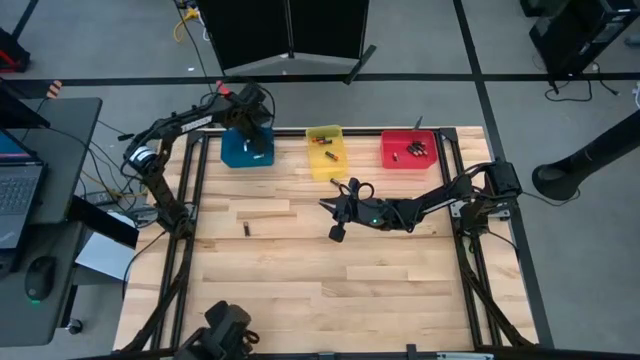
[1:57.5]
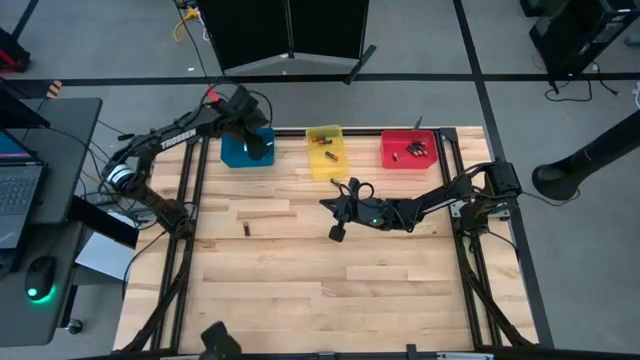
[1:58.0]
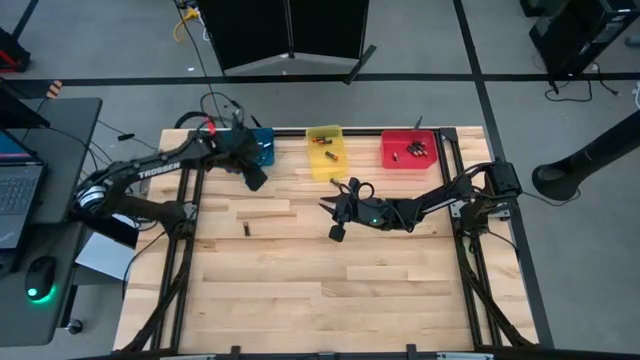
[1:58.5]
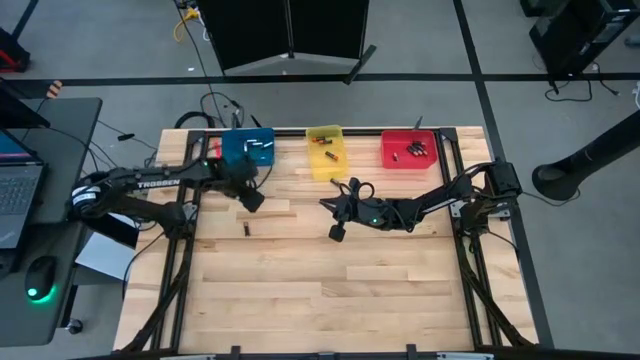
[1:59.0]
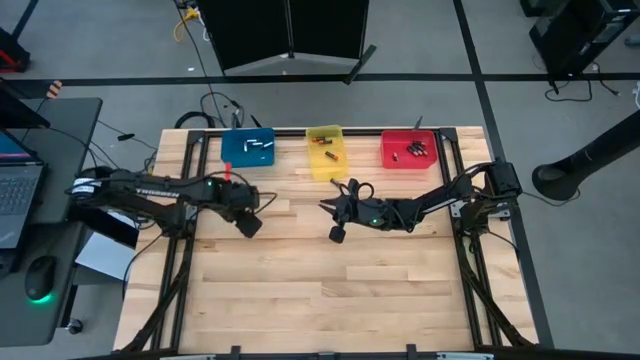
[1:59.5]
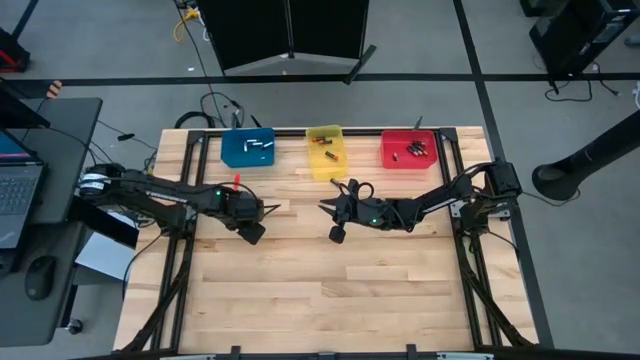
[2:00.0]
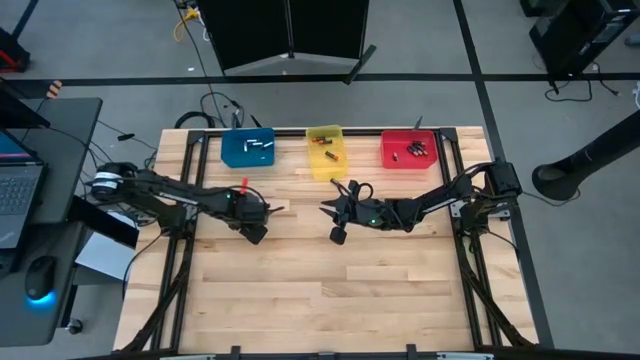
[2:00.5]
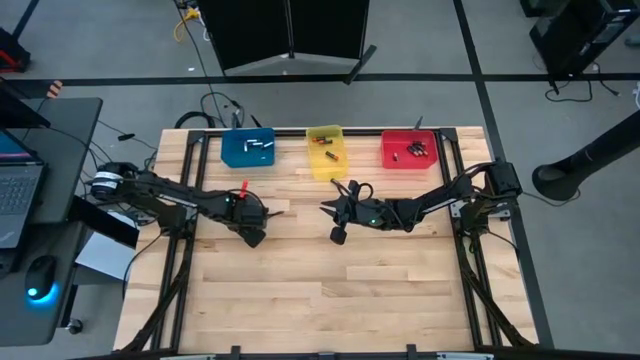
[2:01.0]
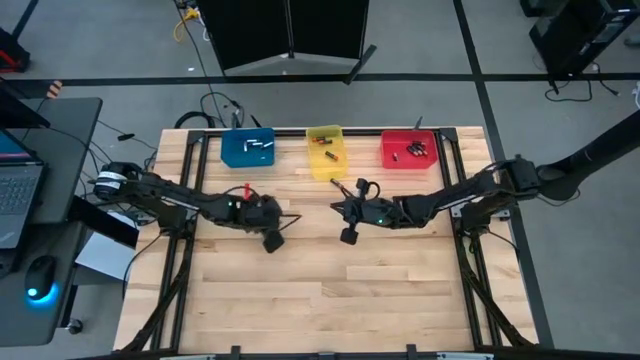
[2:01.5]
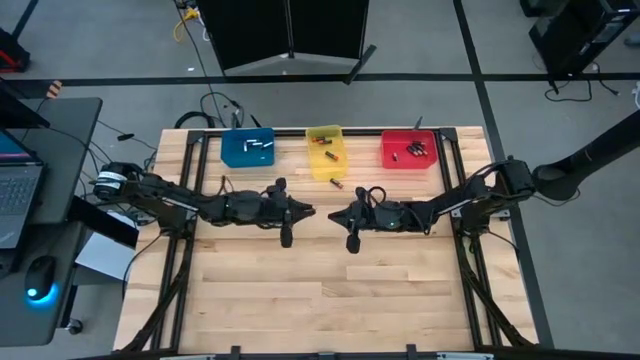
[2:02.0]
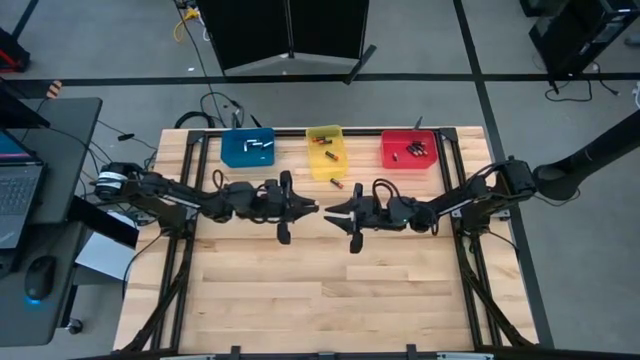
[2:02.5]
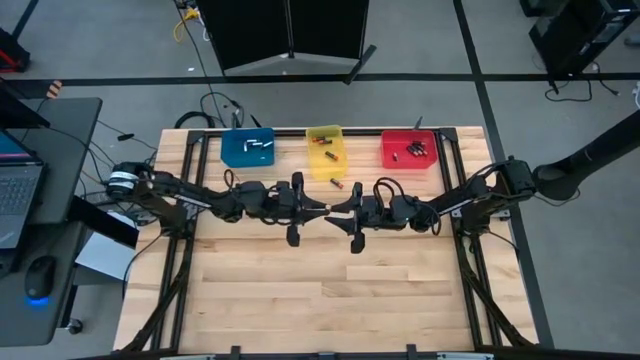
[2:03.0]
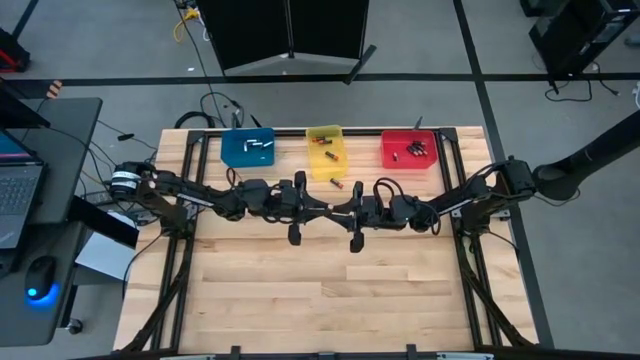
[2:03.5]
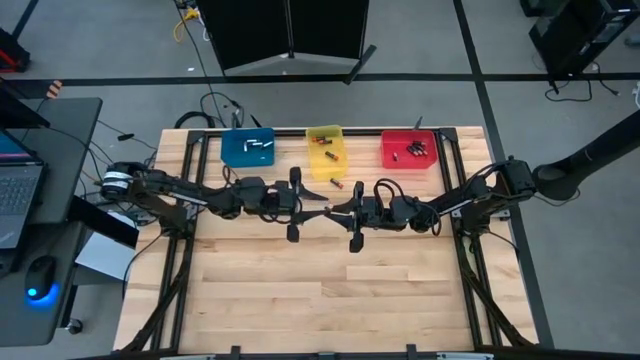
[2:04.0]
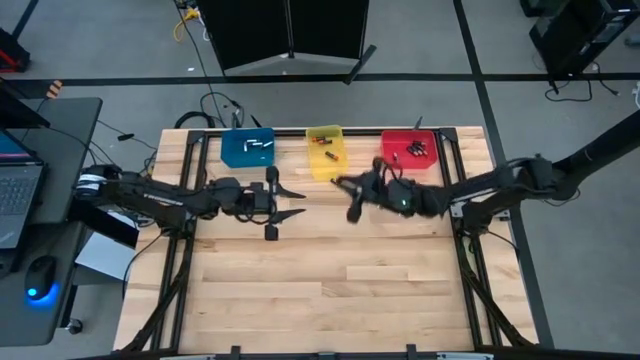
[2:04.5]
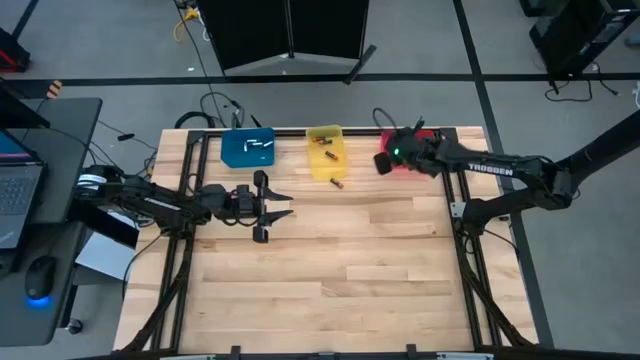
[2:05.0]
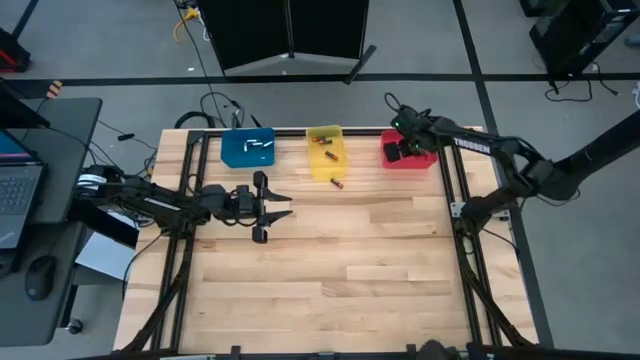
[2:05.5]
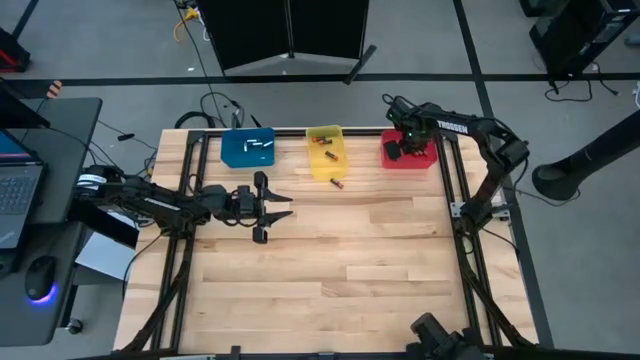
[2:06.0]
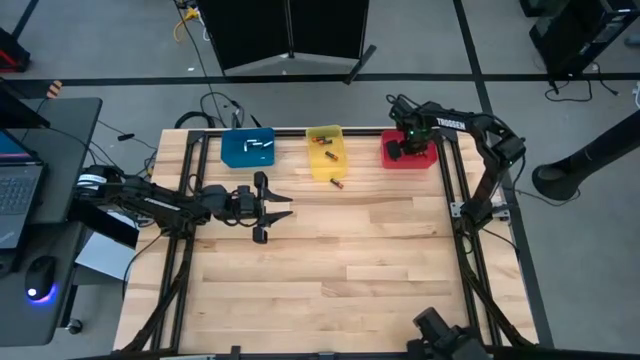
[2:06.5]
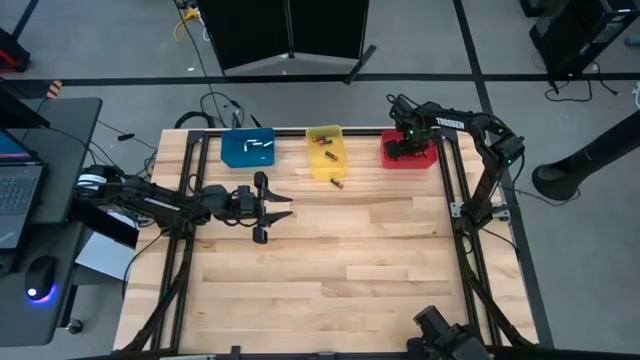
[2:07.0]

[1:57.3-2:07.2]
Task: Sort batteries
Put the black brown battery into the red bin

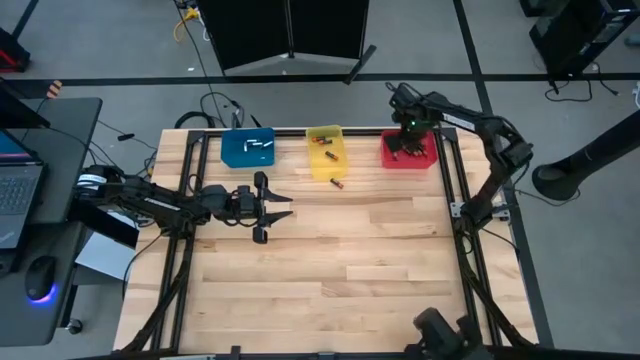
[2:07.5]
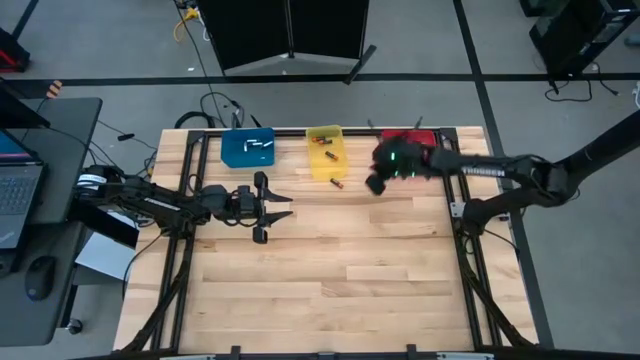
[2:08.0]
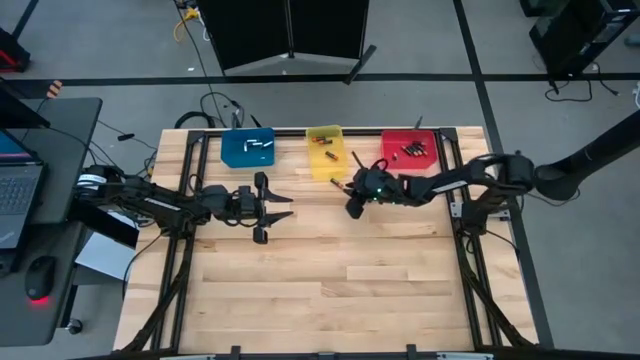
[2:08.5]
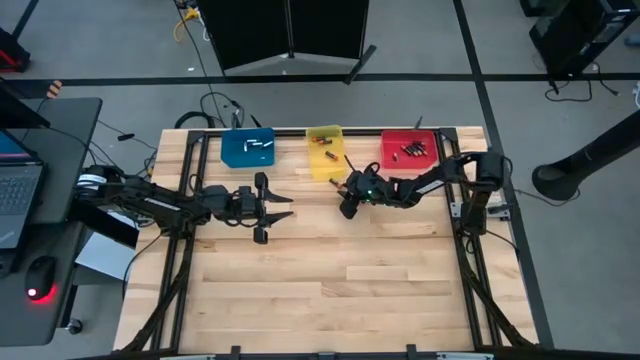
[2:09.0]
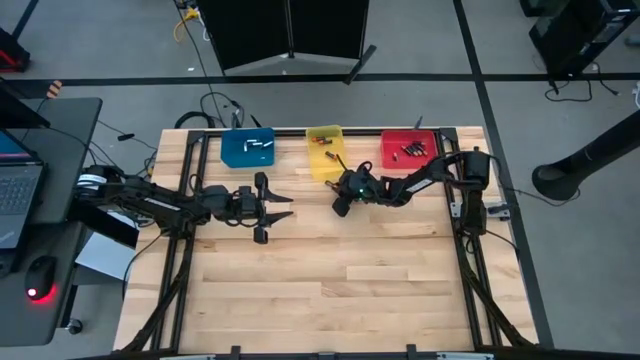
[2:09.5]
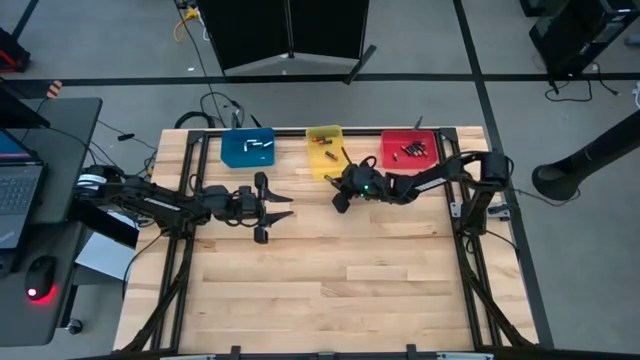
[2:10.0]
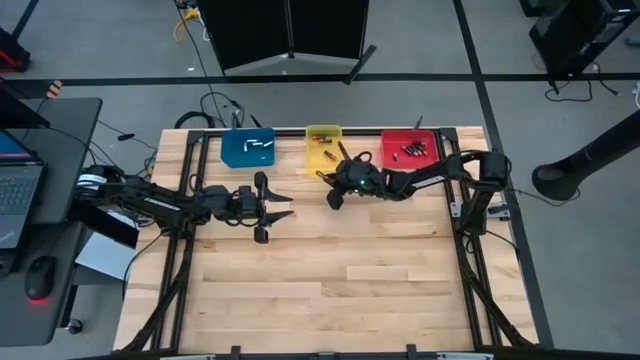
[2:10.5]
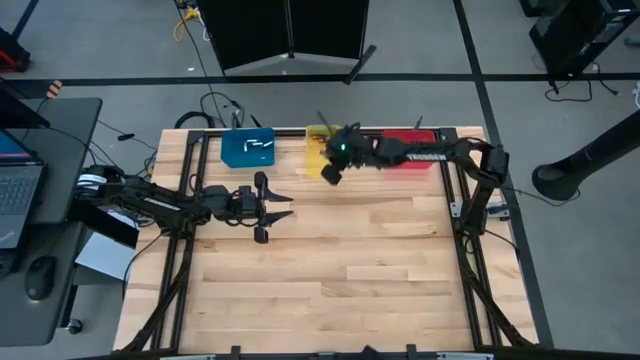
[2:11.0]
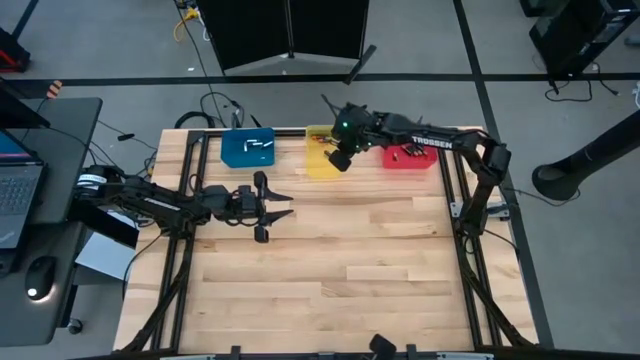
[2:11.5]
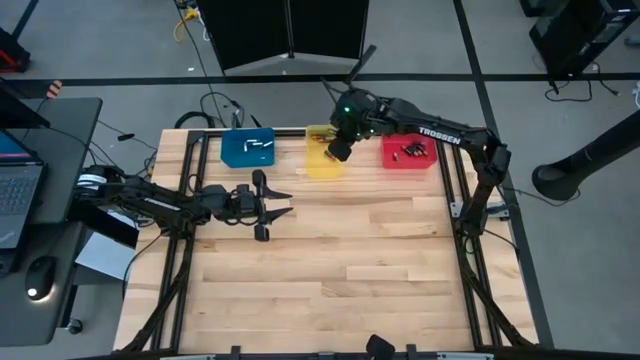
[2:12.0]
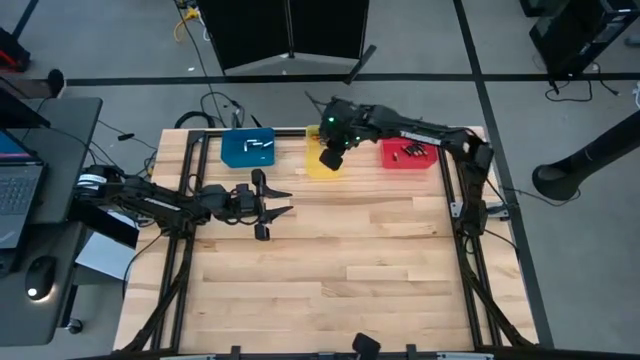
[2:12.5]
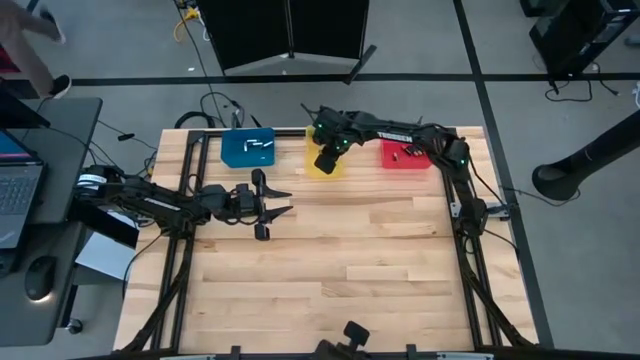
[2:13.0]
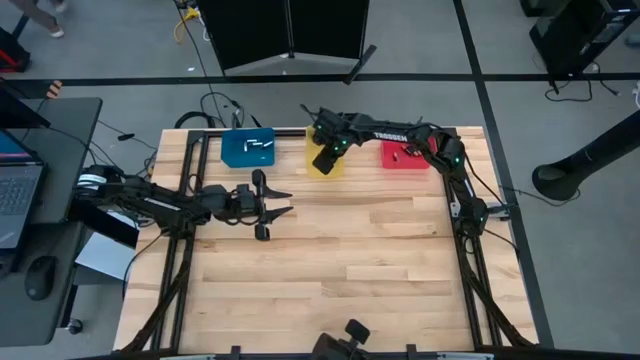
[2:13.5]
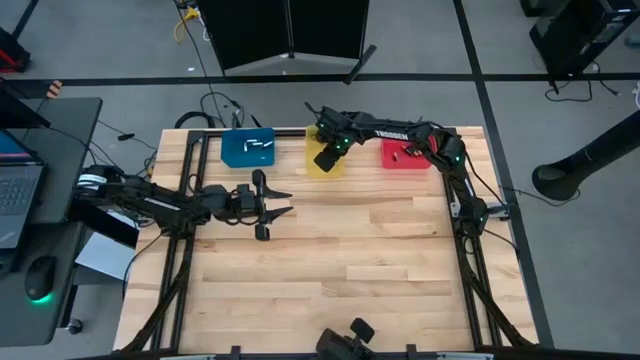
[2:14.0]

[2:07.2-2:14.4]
Put the black red battery into the yellow bin

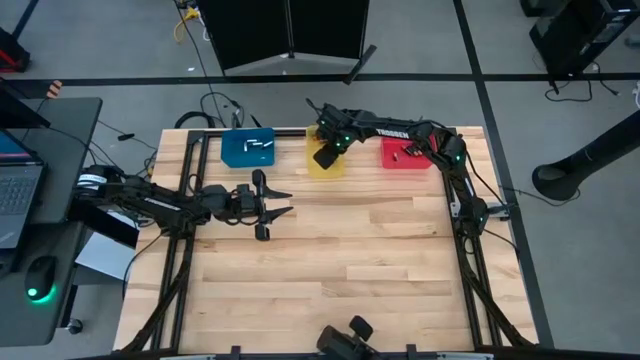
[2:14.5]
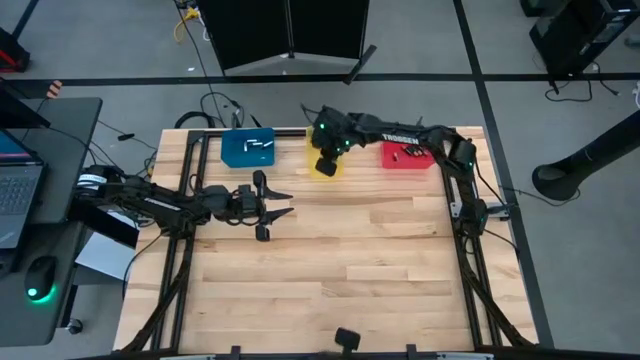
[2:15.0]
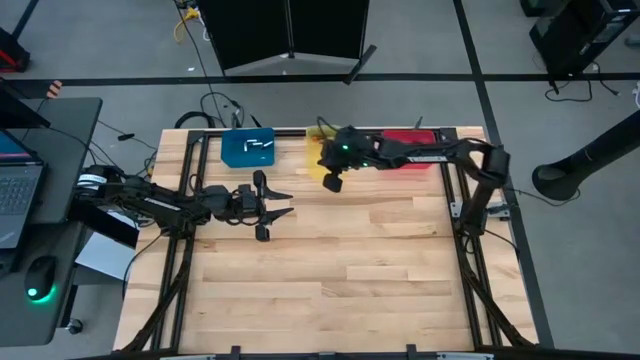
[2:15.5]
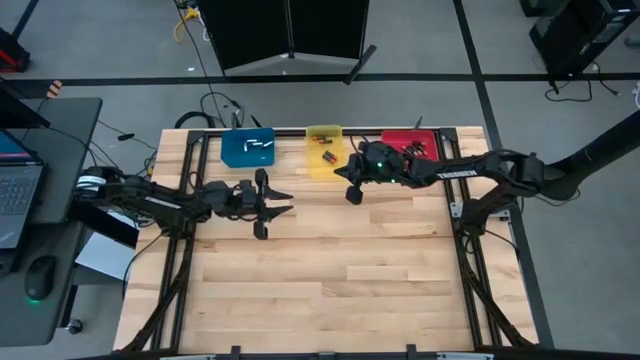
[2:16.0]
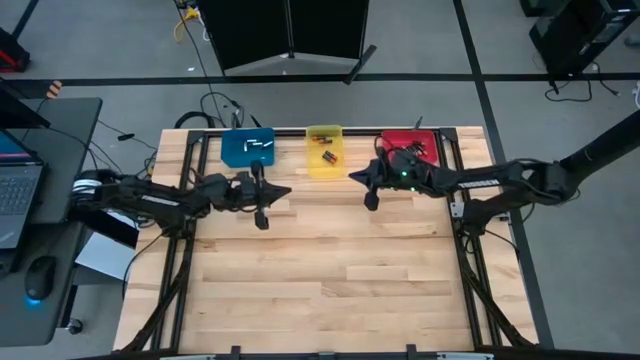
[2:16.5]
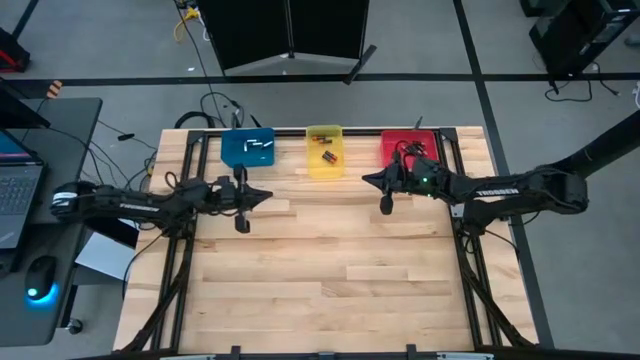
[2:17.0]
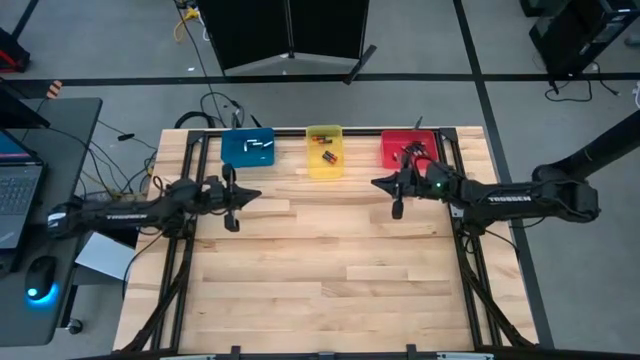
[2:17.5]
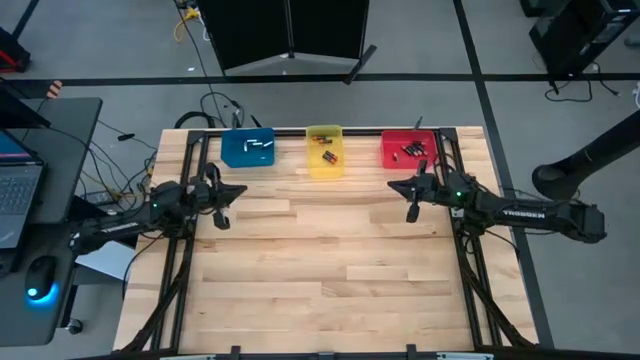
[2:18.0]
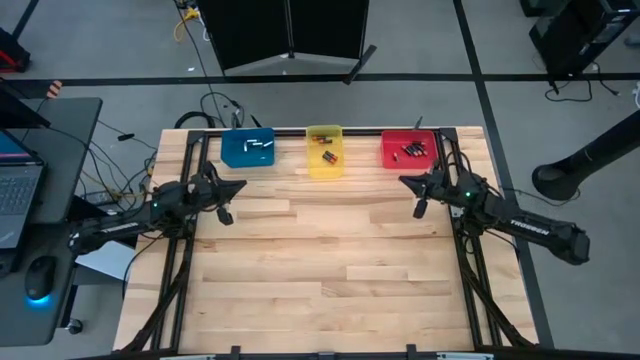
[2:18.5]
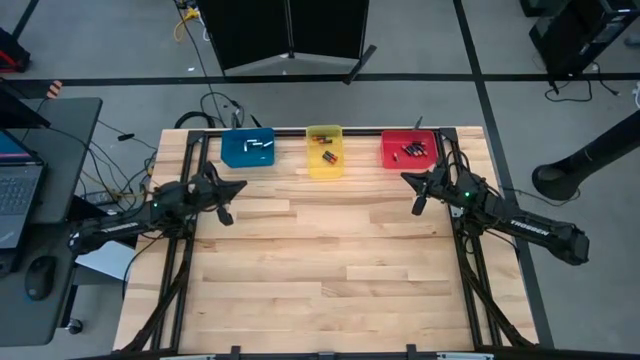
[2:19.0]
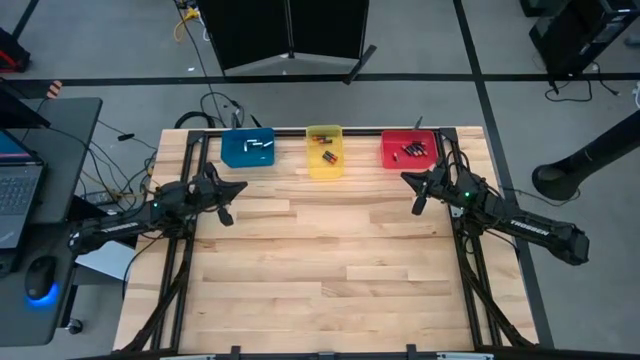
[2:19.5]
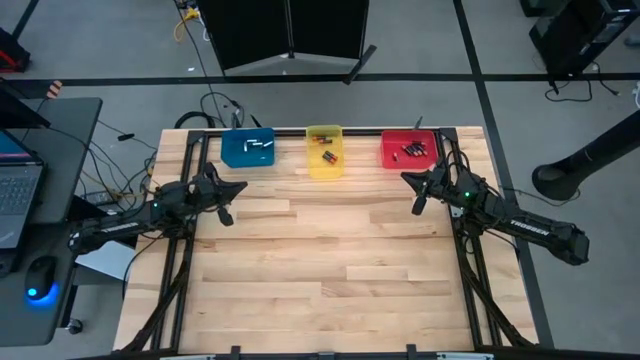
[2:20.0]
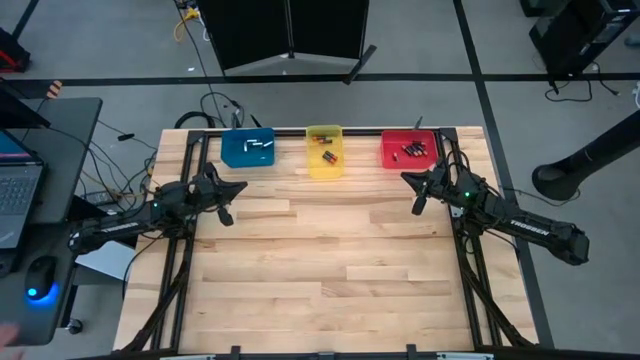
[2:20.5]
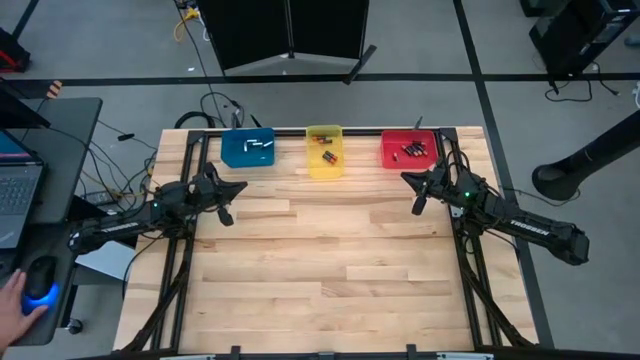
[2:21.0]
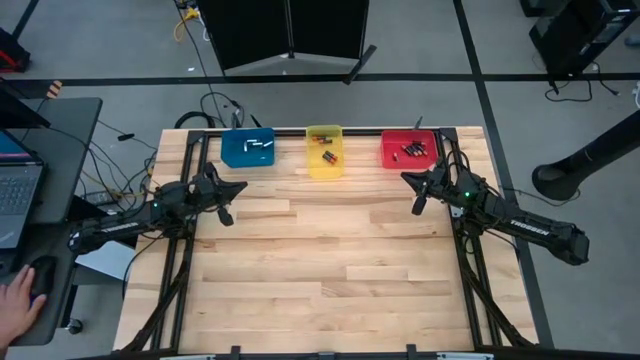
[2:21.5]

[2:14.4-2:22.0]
Return to Home Position
